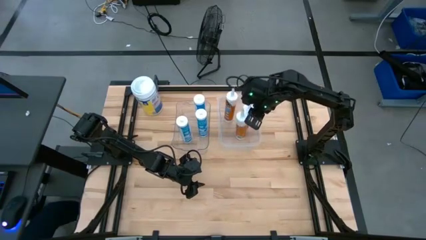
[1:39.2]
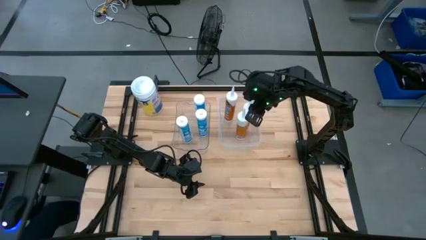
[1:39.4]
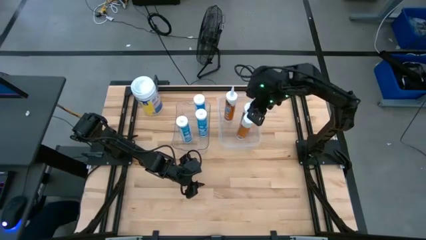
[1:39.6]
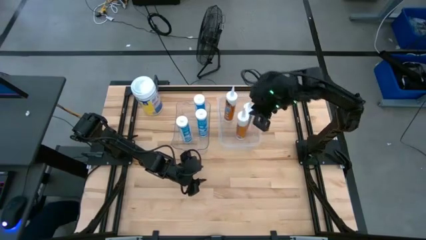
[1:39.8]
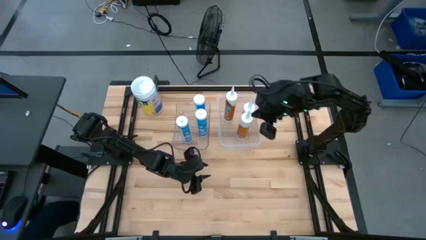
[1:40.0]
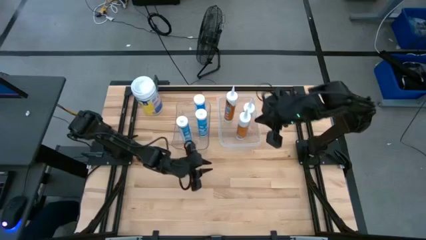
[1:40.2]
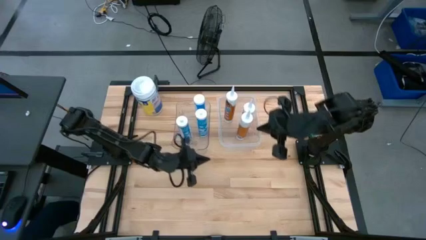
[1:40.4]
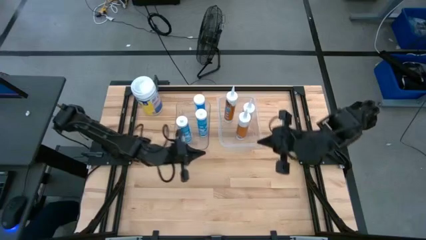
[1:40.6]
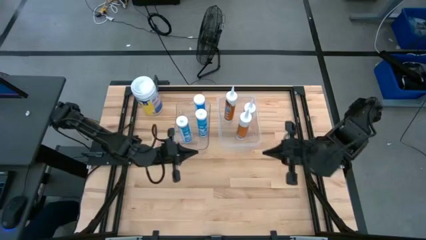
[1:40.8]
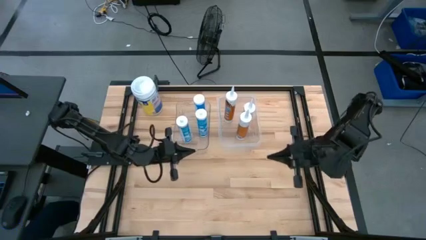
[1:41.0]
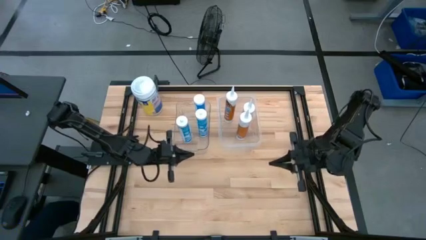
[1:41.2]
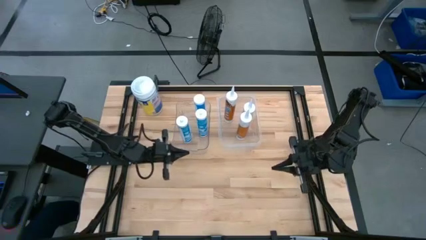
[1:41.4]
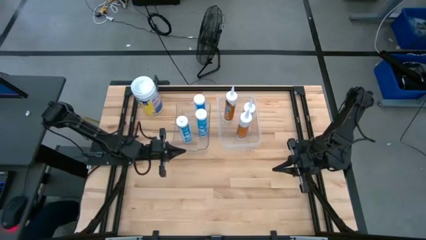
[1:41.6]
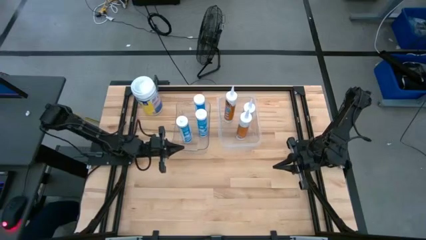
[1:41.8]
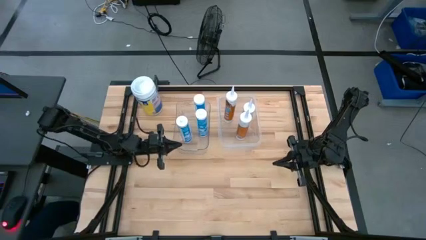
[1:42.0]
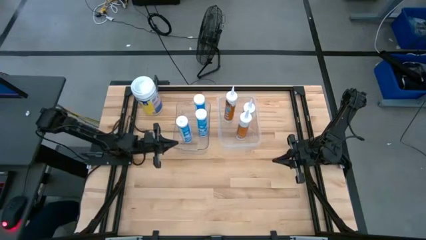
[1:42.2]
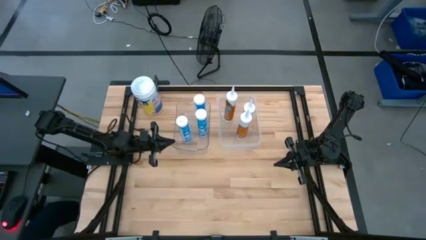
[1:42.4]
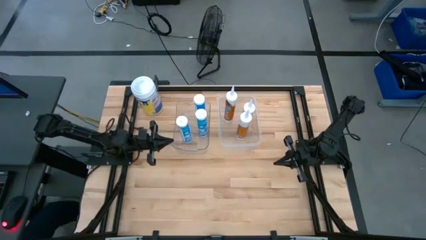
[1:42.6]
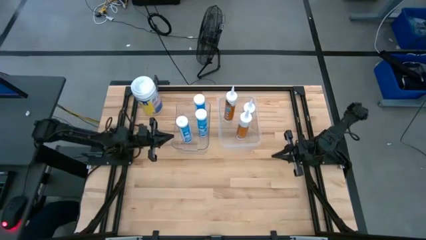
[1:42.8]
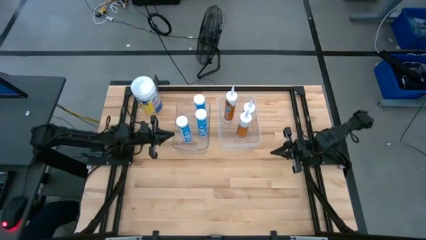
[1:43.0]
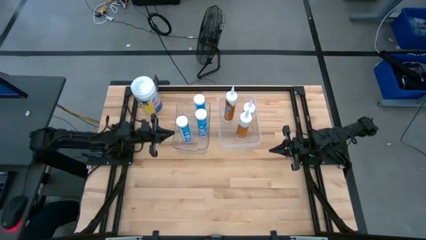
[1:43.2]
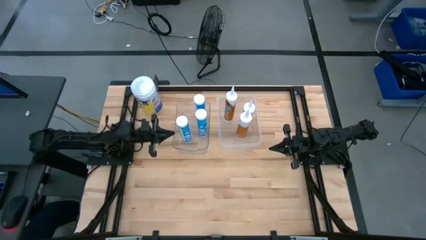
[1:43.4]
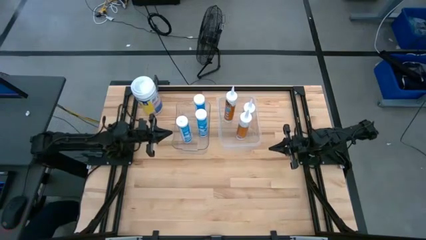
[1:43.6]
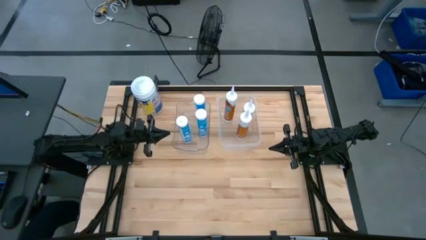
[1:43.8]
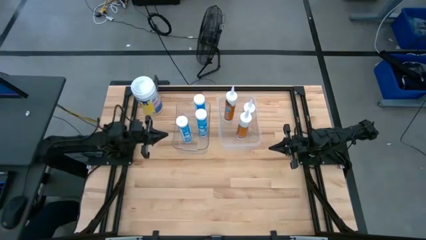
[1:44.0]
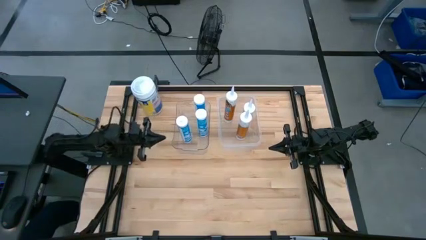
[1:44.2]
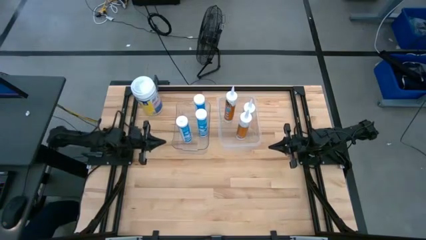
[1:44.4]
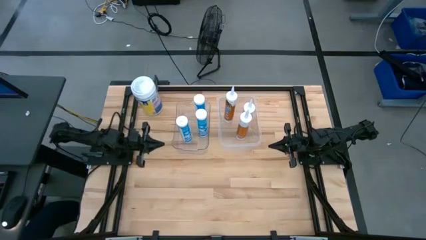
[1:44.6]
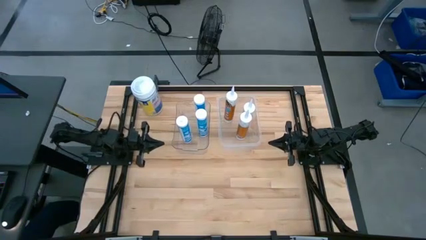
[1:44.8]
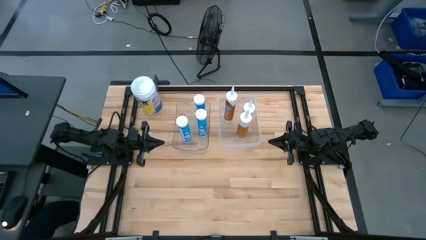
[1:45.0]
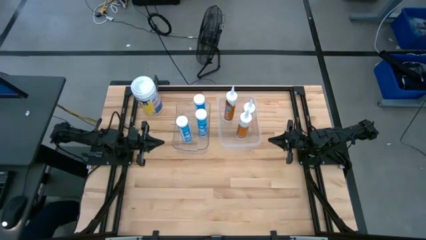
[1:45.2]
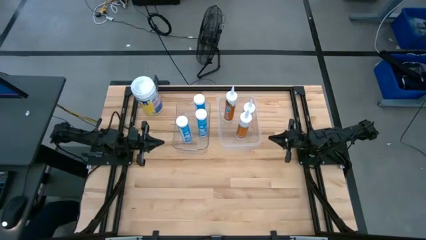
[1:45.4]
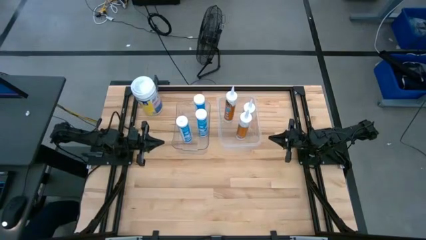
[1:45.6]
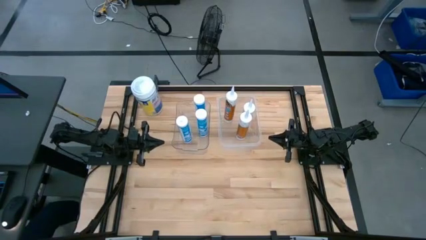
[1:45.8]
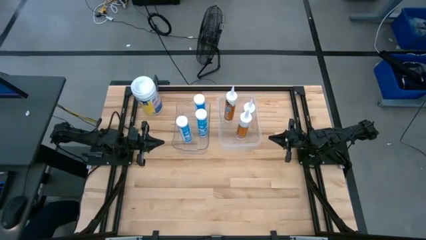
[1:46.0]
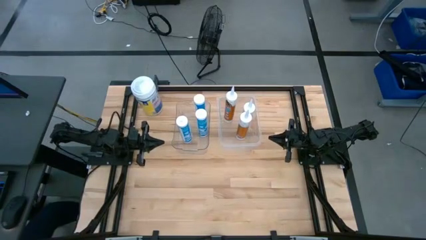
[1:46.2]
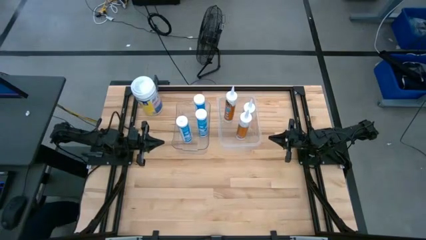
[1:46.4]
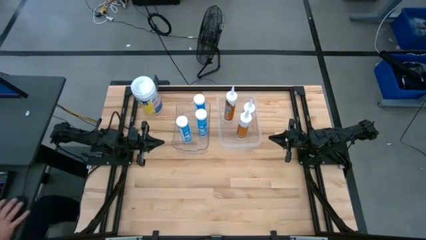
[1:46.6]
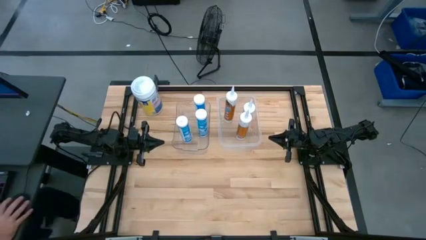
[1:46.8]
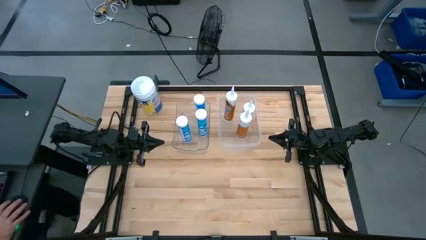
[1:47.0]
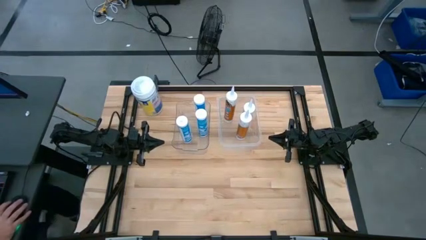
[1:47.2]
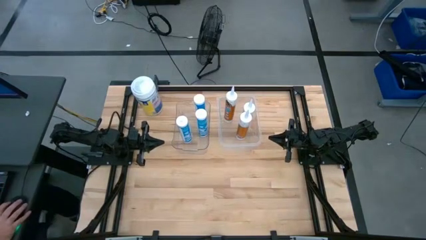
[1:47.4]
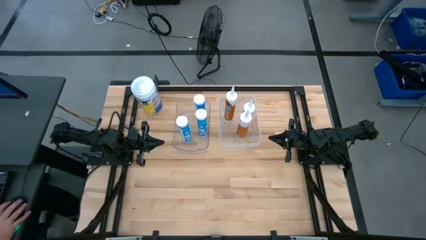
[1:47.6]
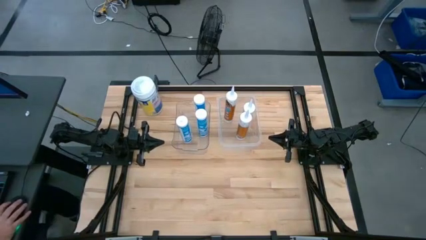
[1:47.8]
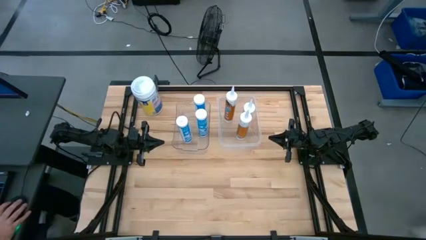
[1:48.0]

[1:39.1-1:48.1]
Task: Pick & place silicon tubes, Sealant and Lysol wipes
Return to Home Position

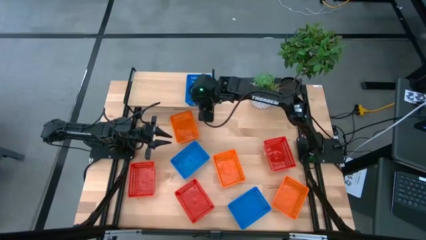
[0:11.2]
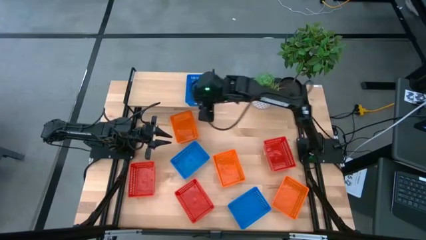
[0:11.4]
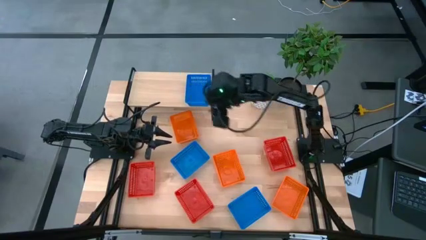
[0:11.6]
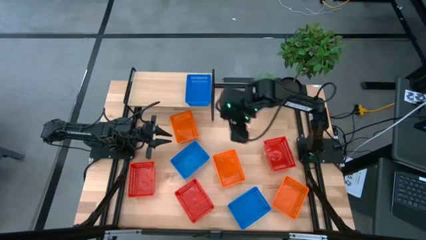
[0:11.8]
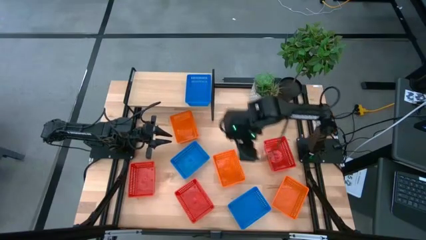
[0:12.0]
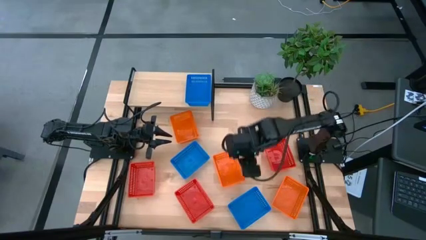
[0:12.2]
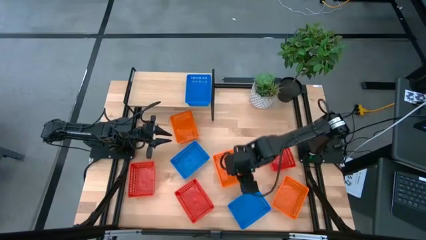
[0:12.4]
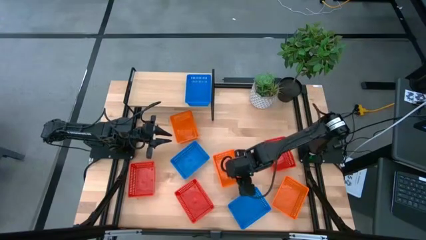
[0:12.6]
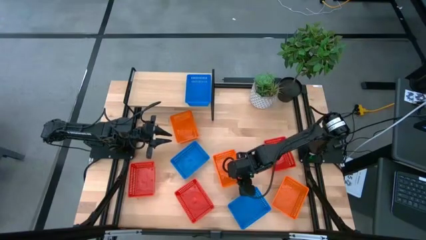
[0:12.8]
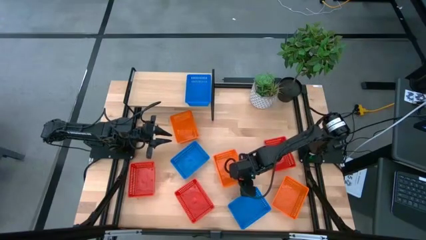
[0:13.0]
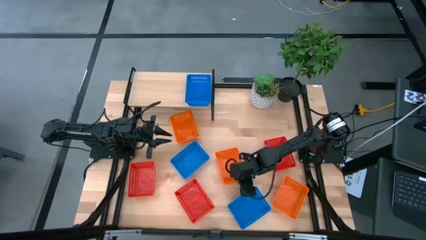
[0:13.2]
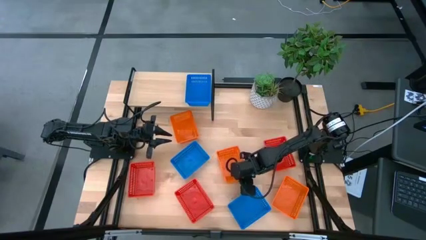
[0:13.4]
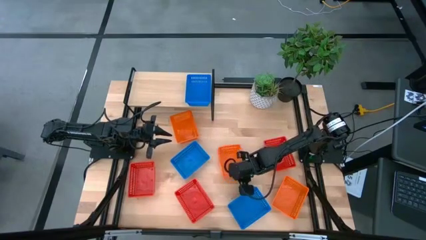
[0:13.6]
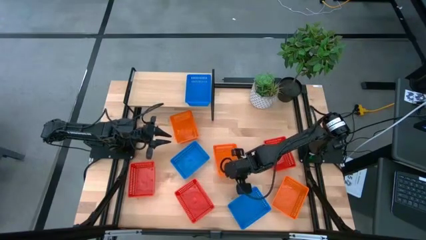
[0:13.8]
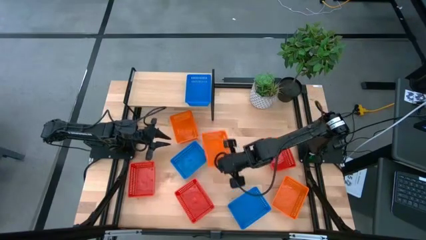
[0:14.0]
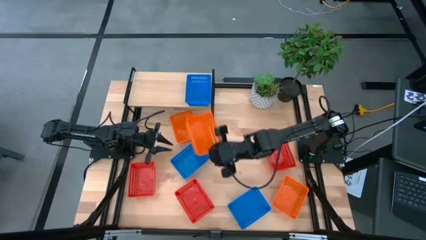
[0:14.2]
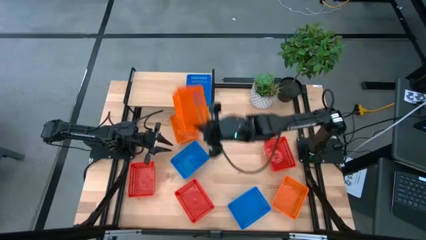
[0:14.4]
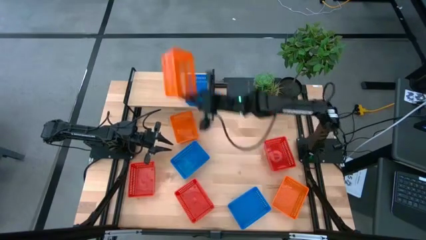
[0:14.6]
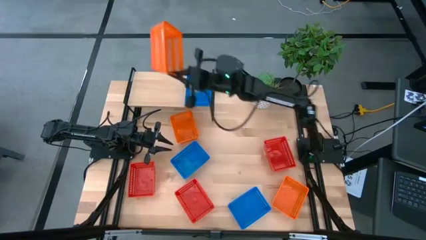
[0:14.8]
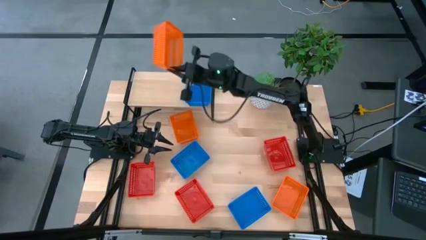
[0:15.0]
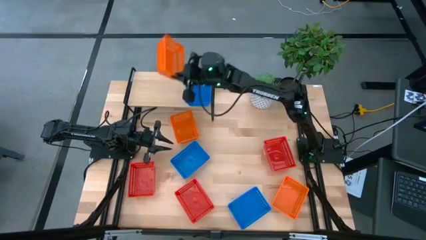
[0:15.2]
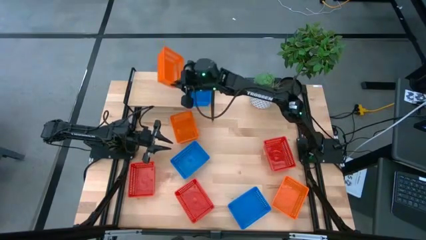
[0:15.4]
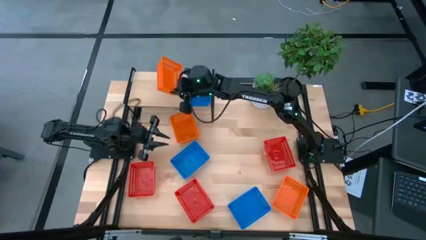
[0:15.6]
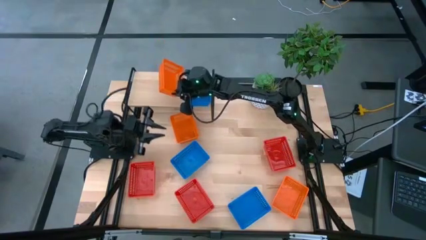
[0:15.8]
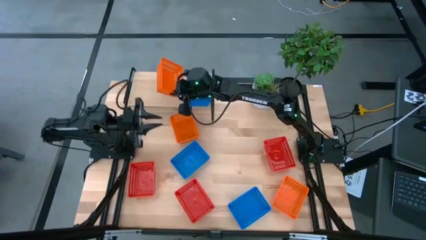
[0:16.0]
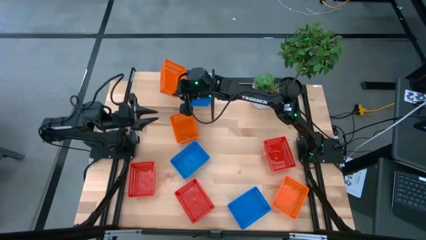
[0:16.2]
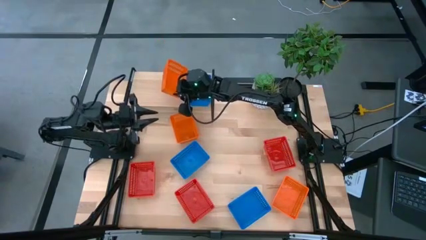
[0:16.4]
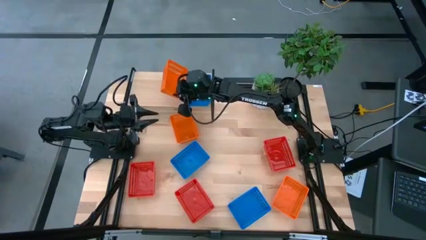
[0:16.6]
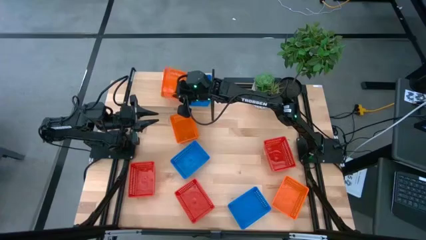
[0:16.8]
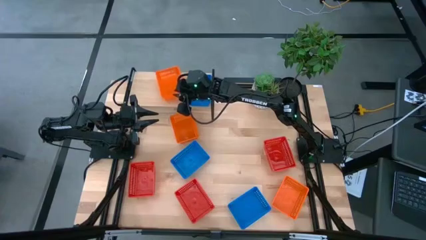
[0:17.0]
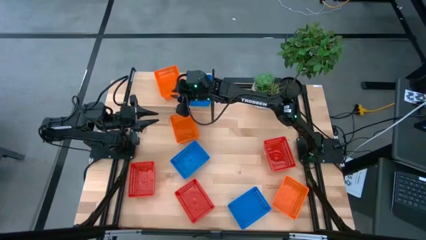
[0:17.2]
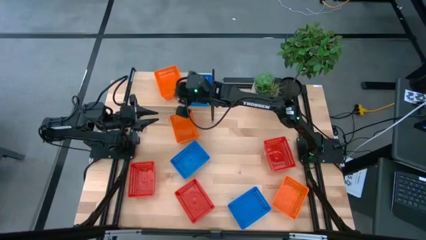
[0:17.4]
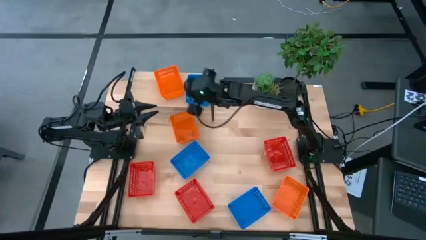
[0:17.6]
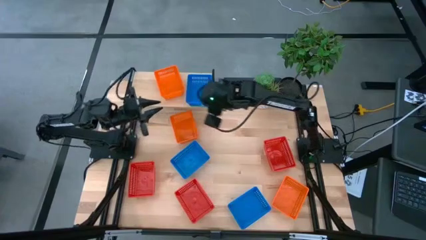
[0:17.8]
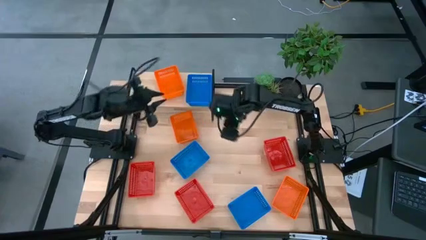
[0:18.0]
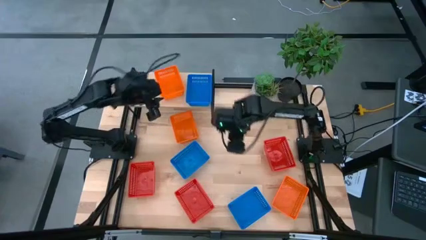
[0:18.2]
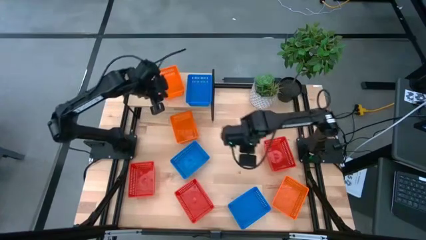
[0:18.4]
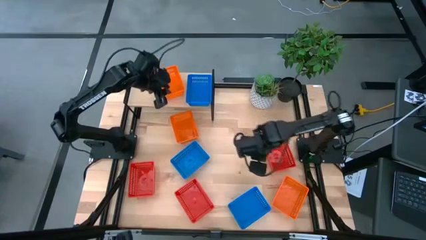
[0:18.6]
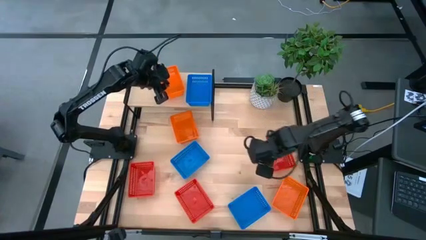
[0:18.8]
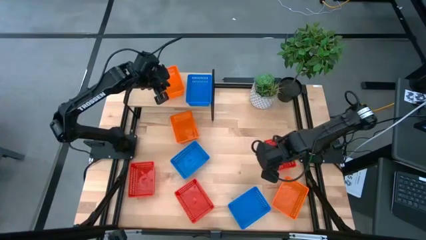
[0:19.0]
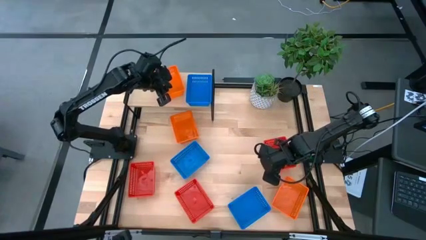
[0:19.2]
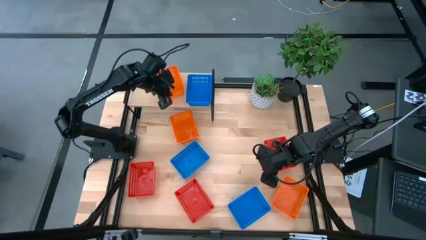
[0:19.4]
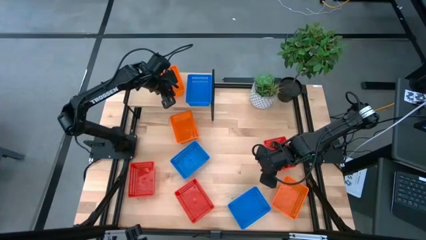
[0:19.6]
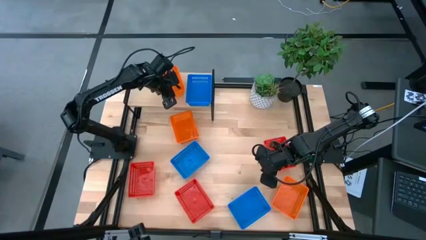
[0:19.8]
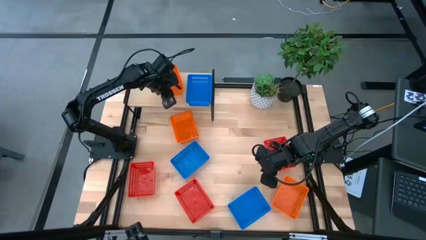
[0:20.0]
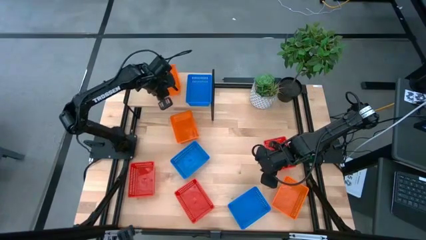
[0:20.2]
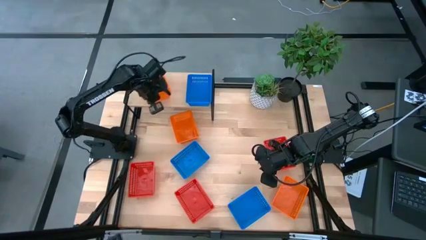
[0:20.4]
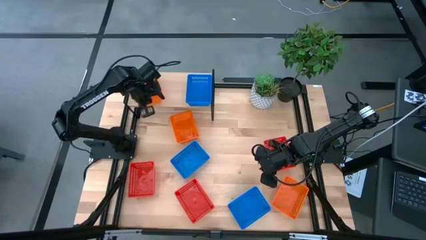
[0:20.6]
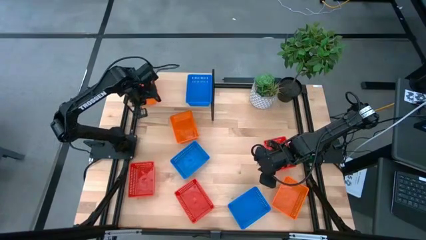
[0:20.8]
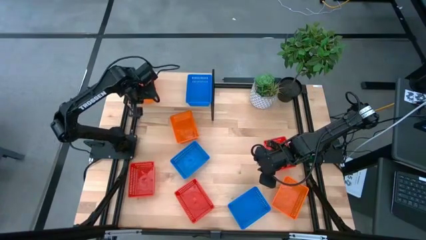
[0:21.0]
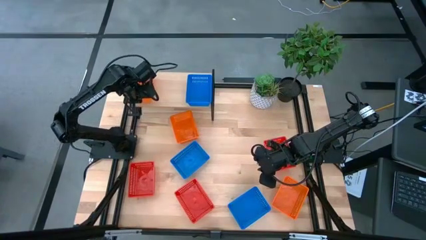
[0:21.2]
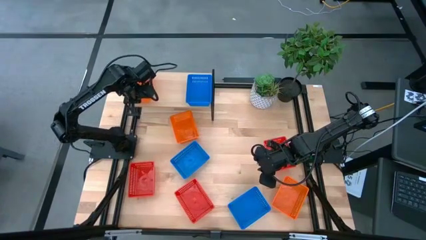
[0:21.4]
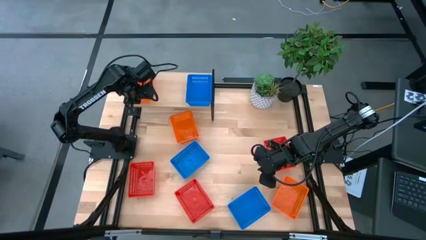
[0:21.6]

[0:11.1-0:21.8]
Task: Stack baskets on shelf by color
Put the middle orange bin on the shelf
